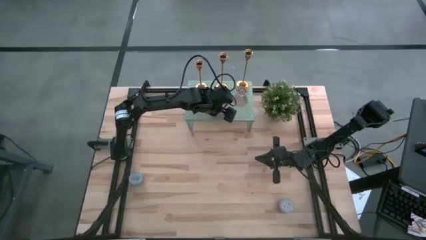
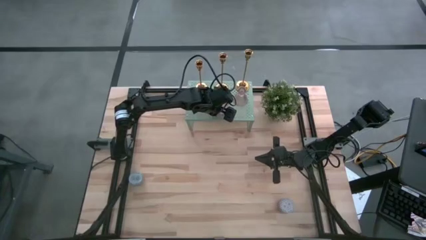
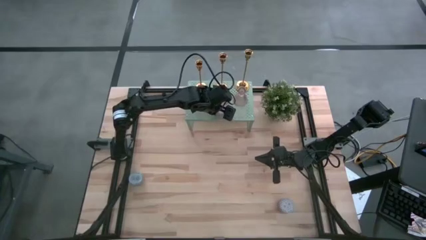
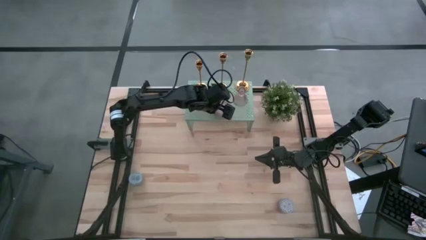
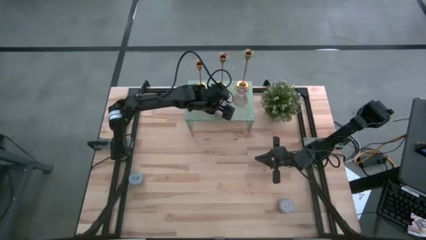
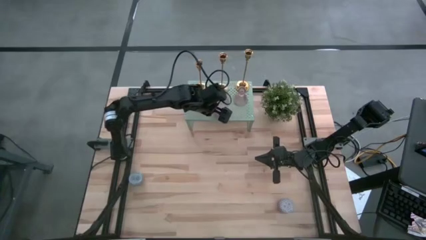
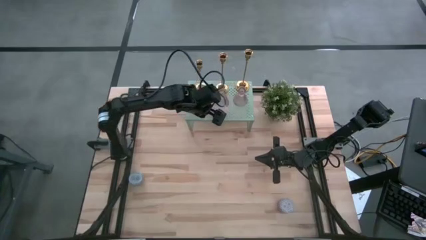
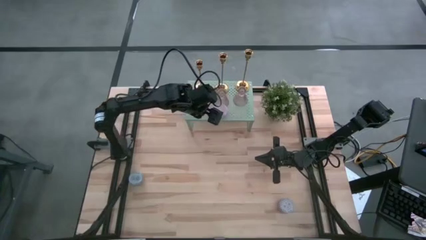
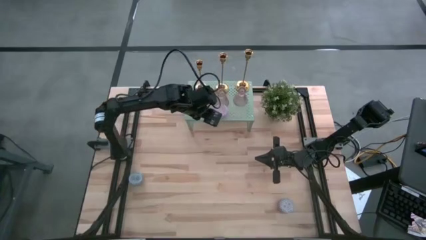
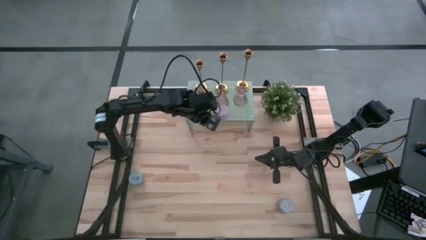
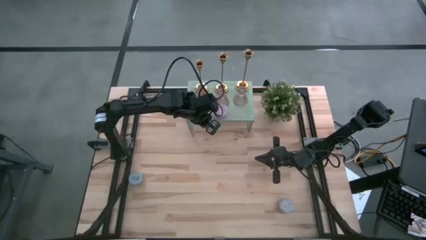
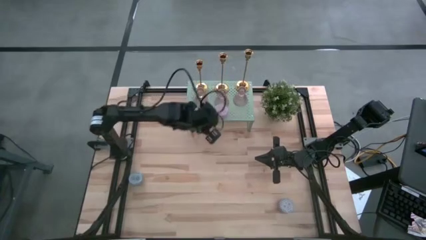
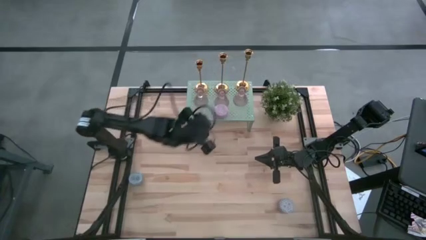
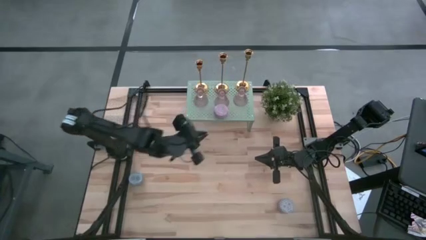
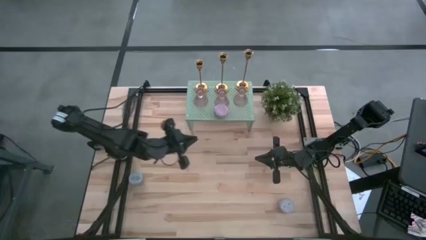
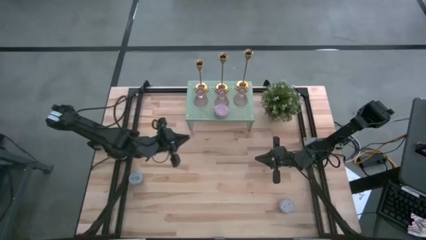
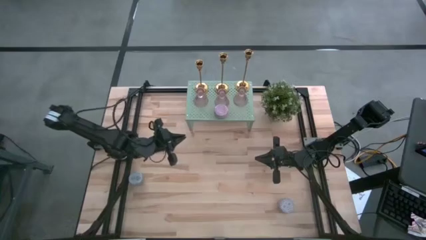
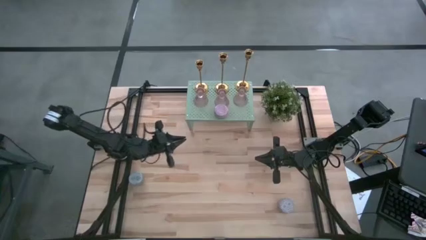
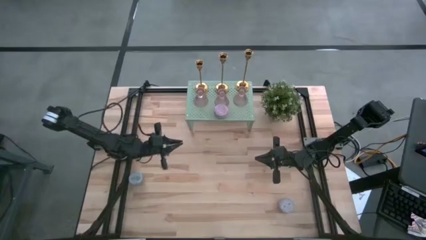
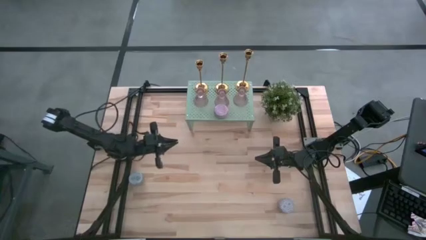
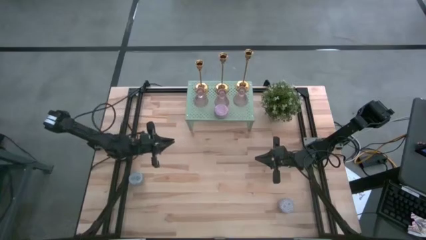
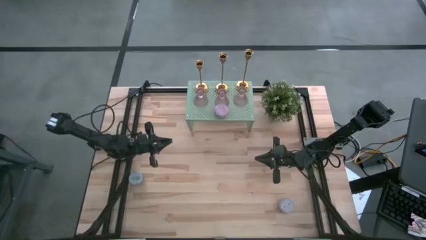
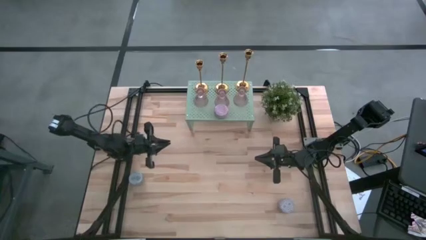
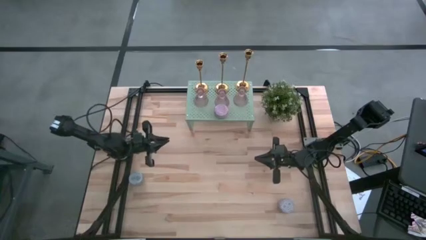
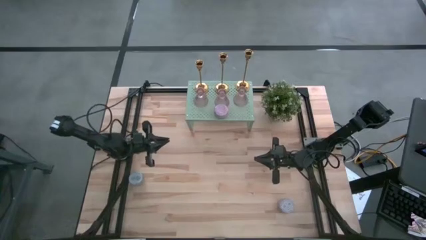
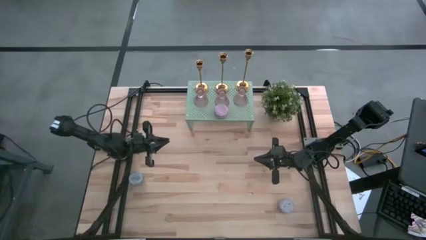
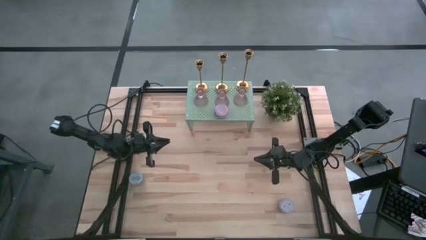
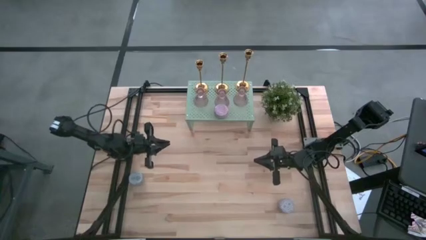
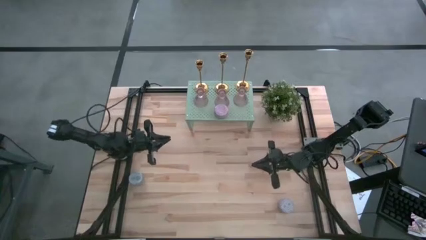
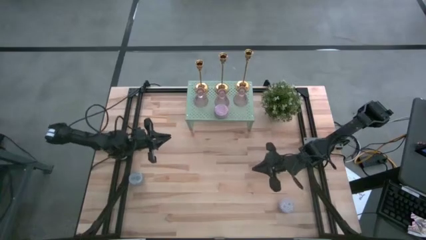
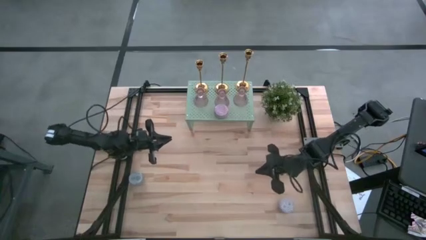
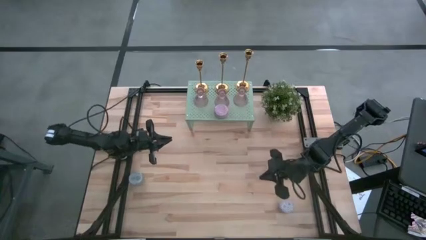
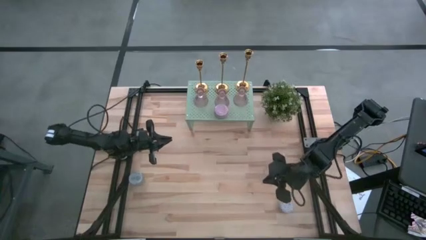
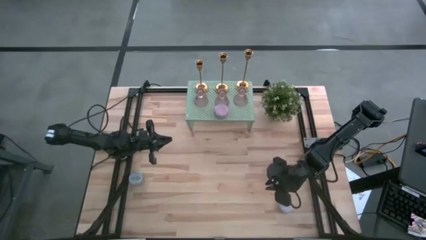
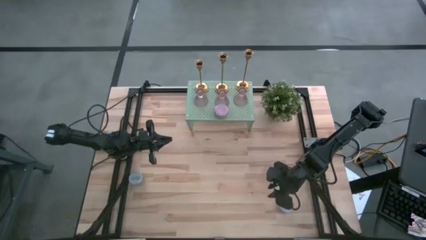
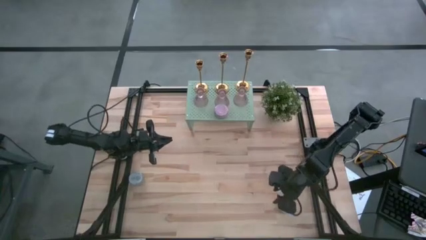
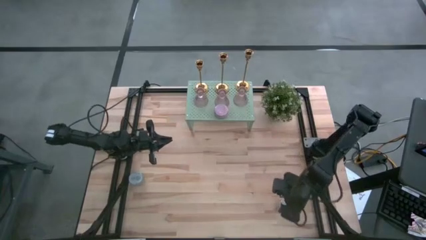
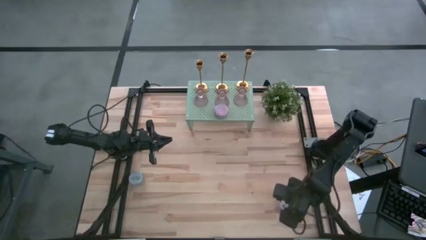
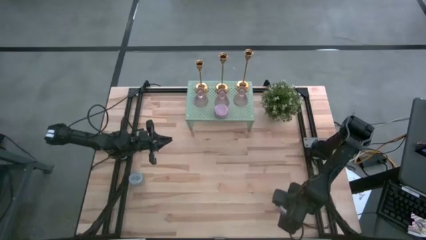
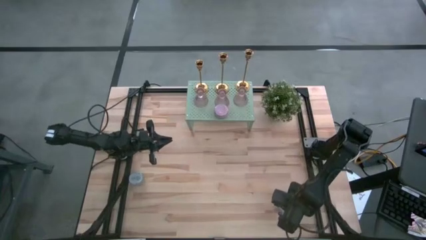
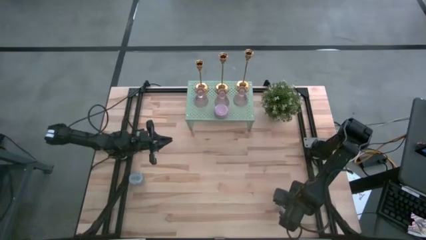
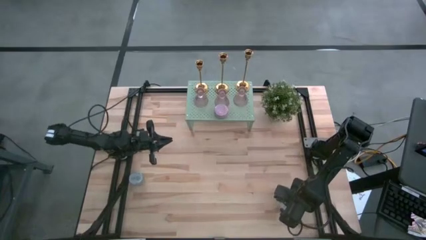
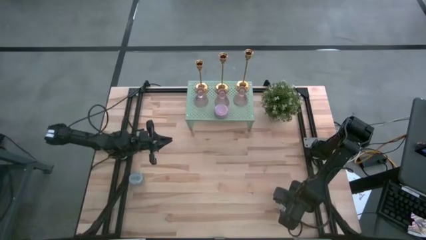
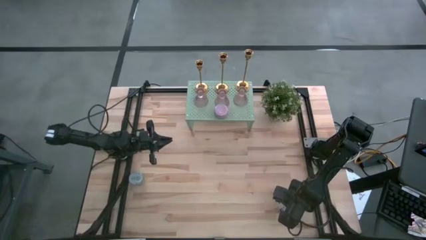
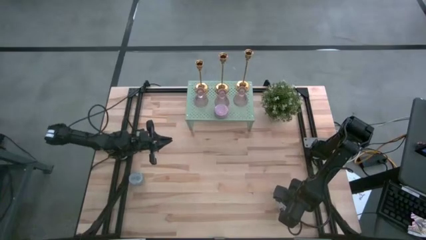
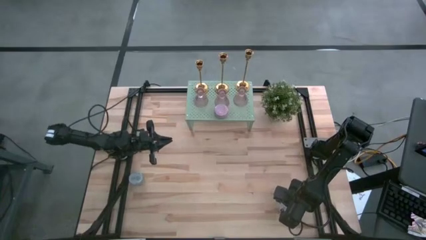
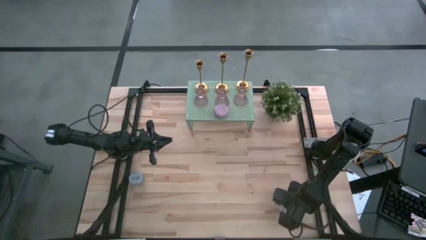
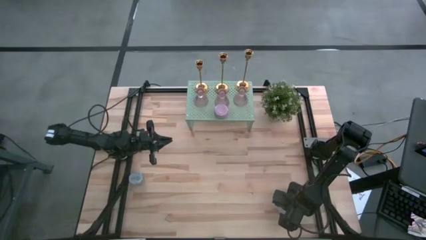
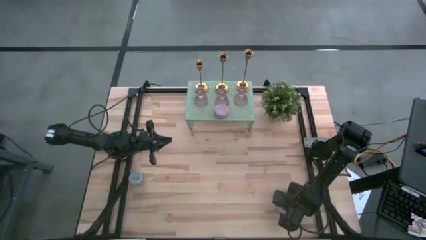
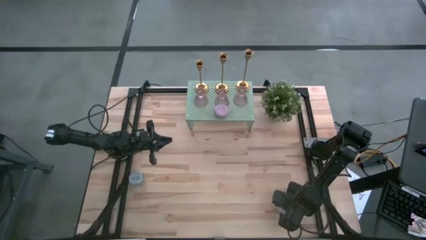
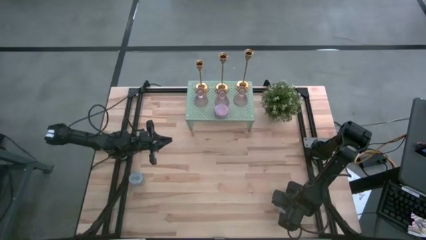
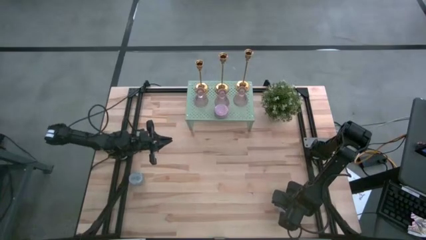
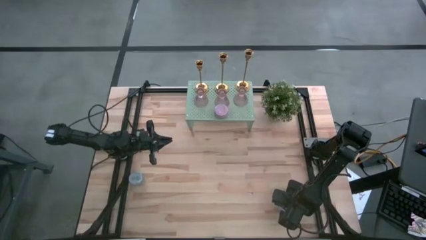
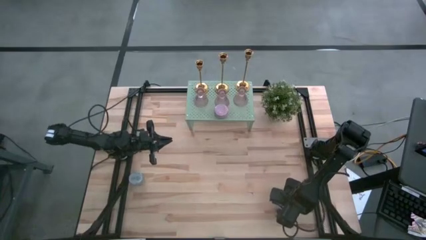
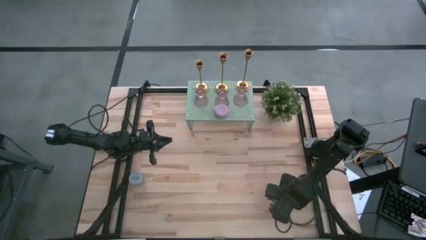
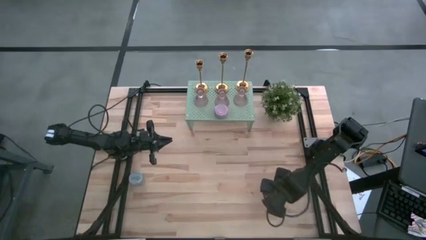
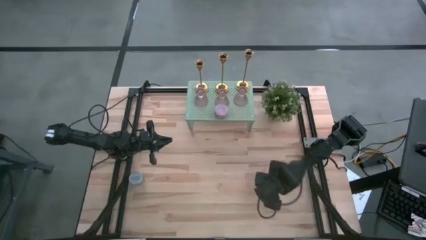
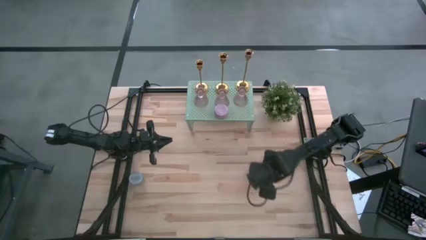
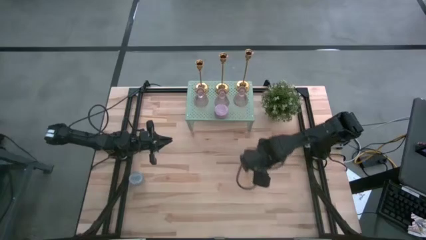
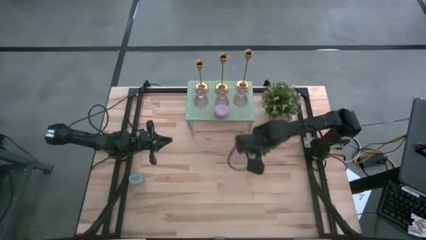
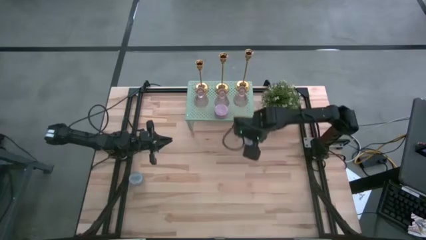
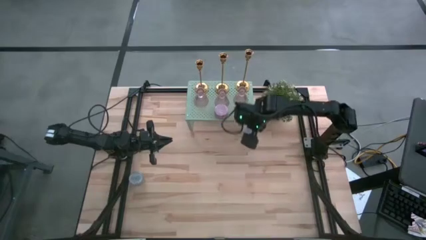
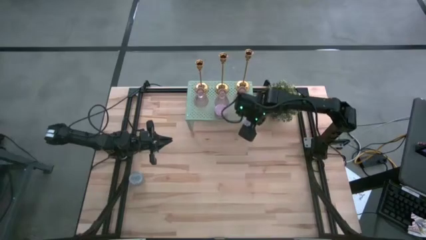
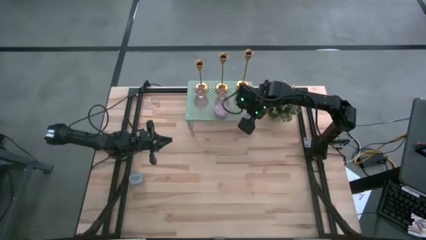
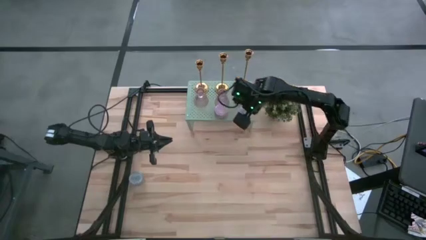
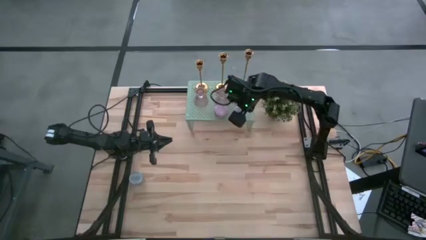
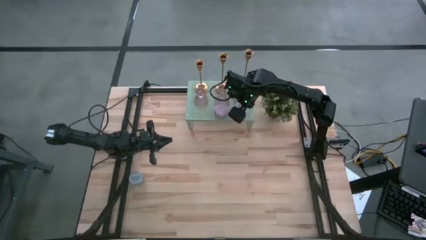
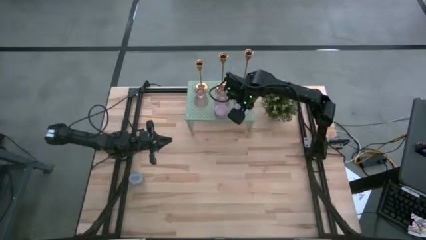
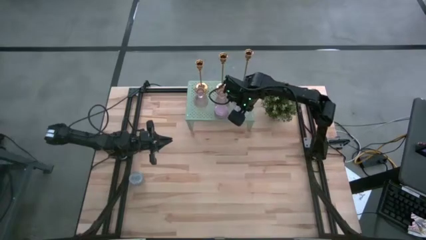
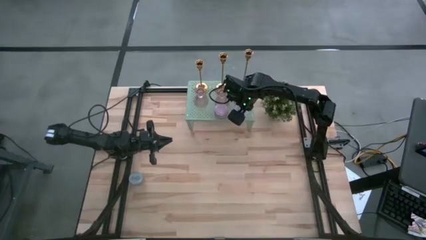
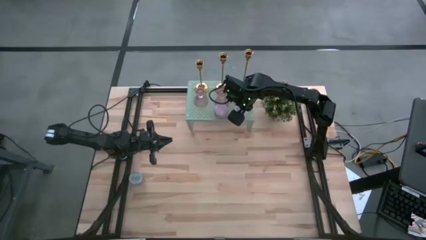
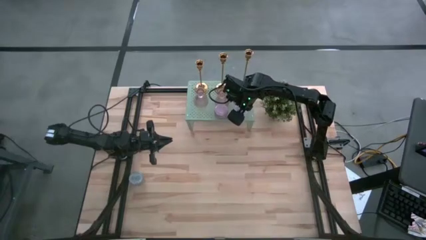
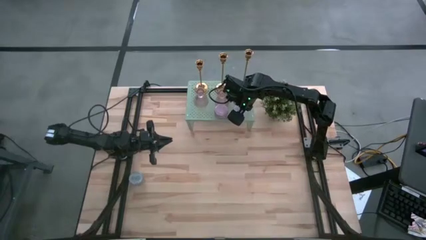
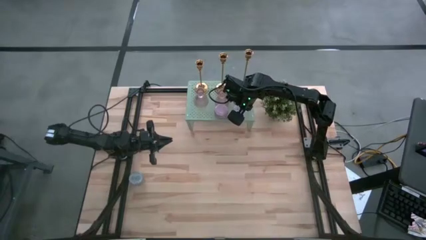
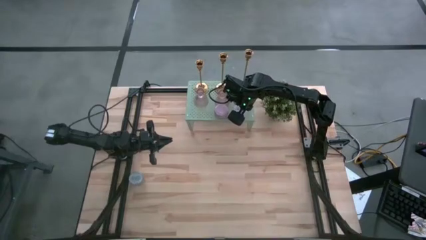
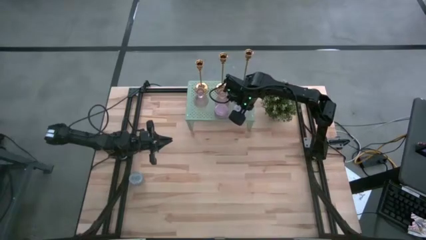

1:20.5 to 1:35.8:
Task: Pick & Place candle stick holders
Put the red patterned scented candle on the shelf
